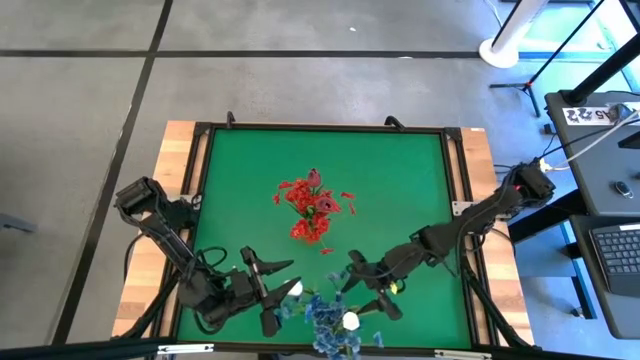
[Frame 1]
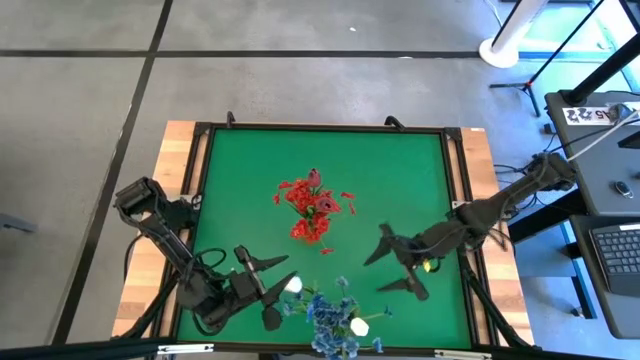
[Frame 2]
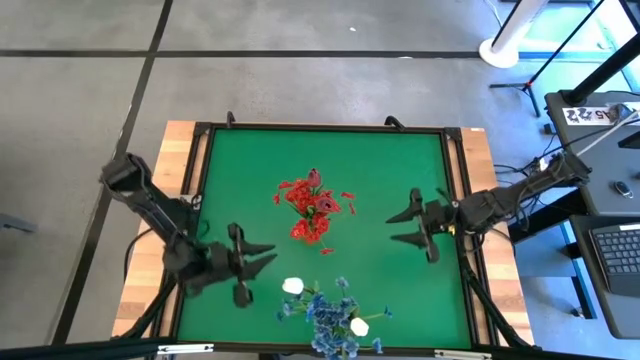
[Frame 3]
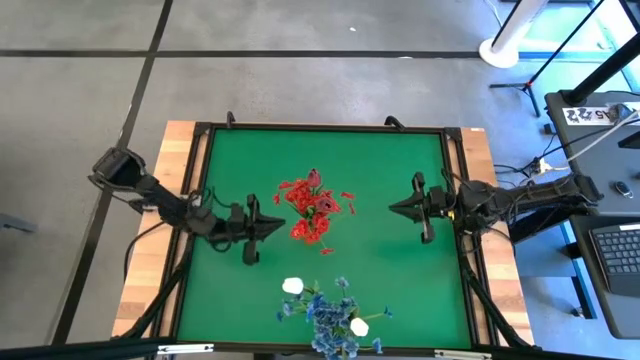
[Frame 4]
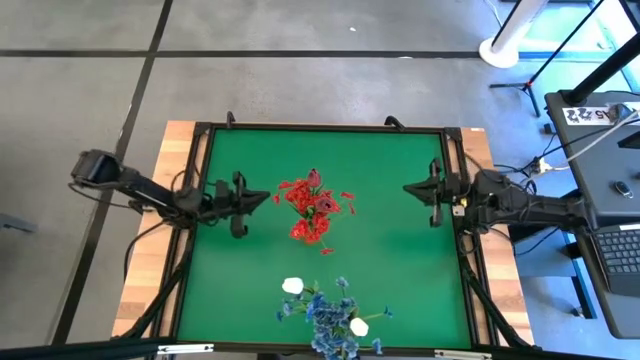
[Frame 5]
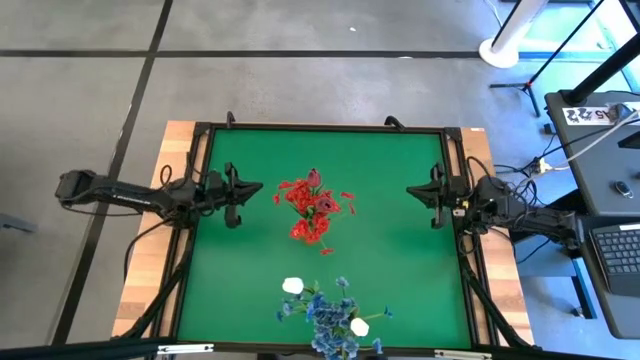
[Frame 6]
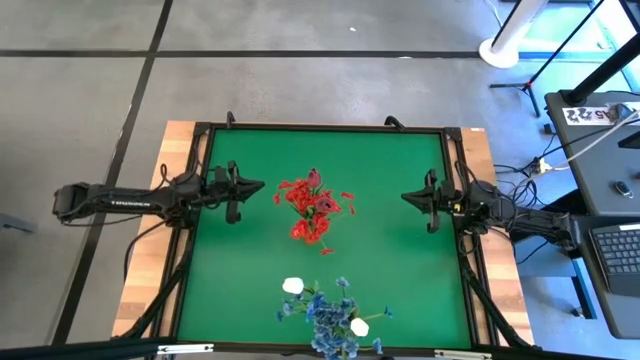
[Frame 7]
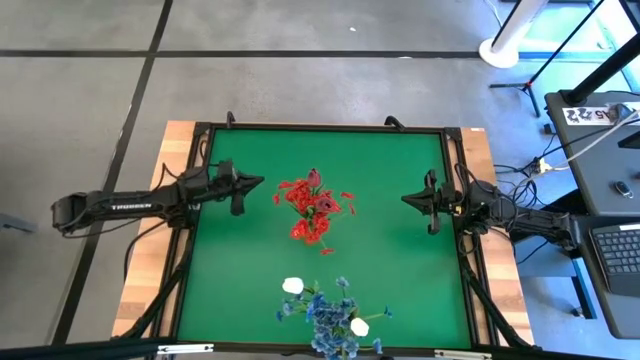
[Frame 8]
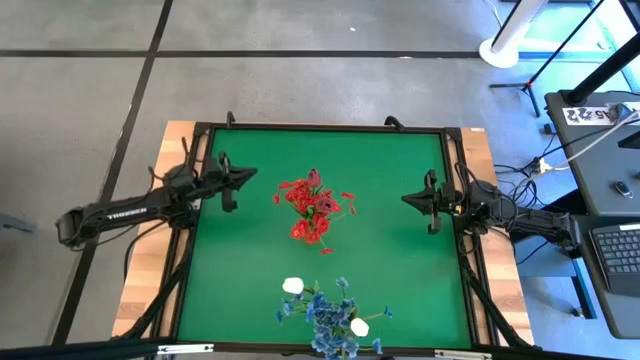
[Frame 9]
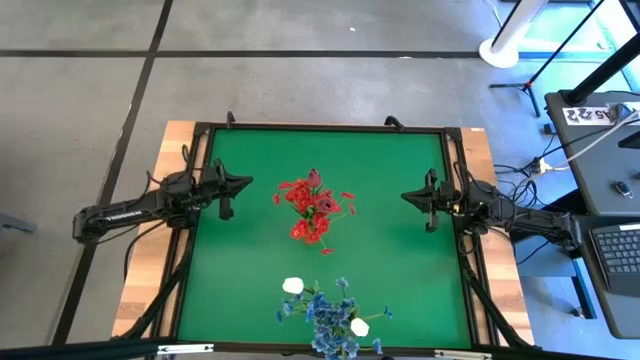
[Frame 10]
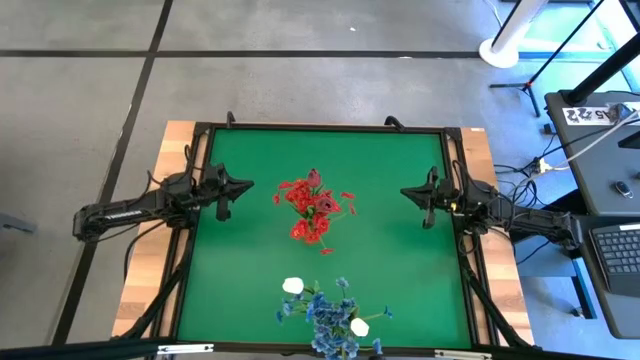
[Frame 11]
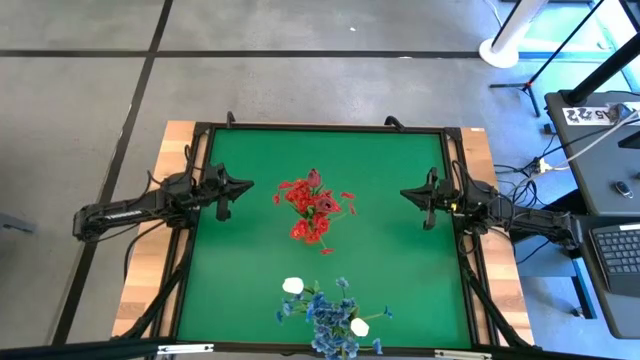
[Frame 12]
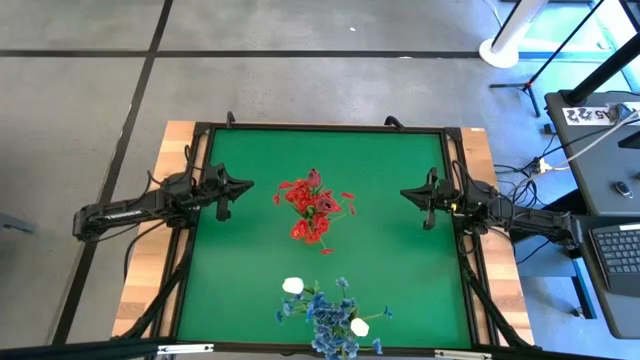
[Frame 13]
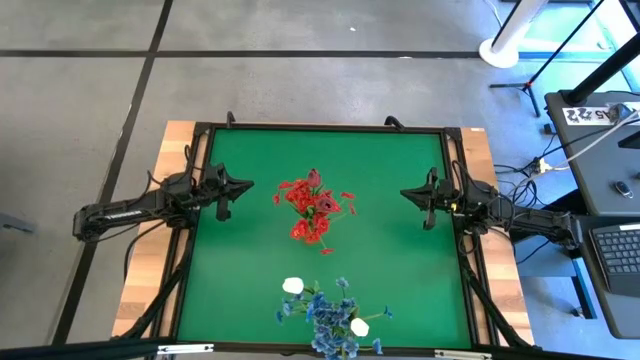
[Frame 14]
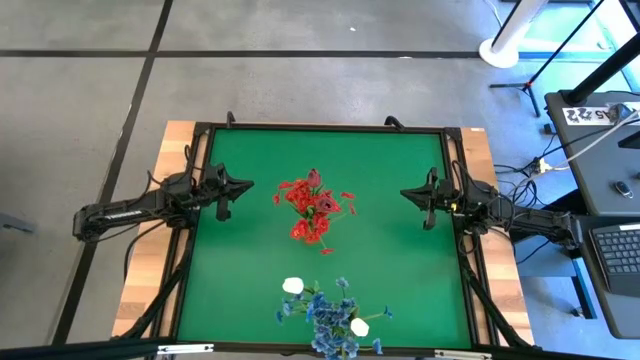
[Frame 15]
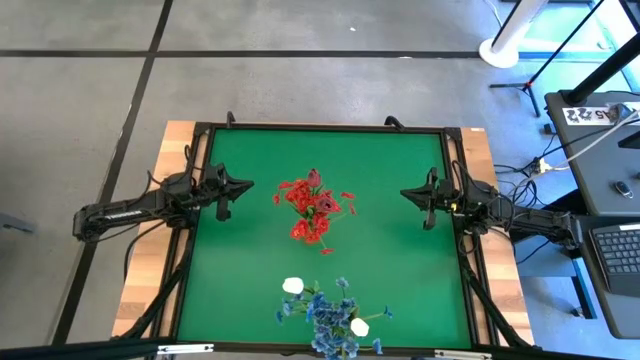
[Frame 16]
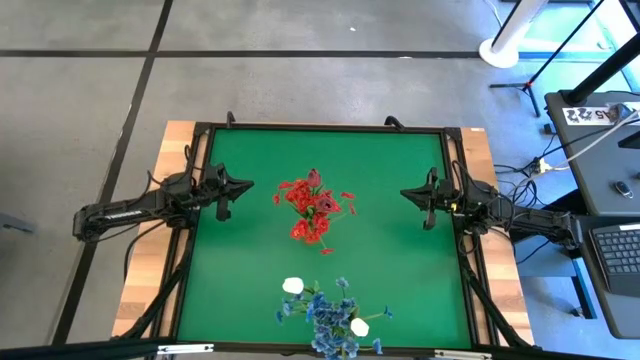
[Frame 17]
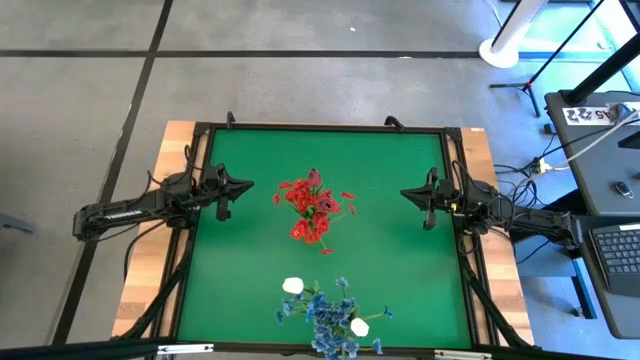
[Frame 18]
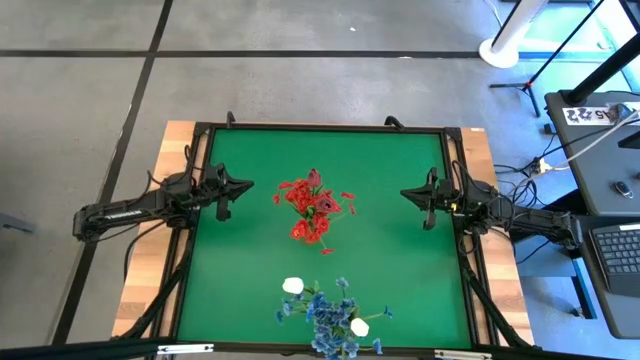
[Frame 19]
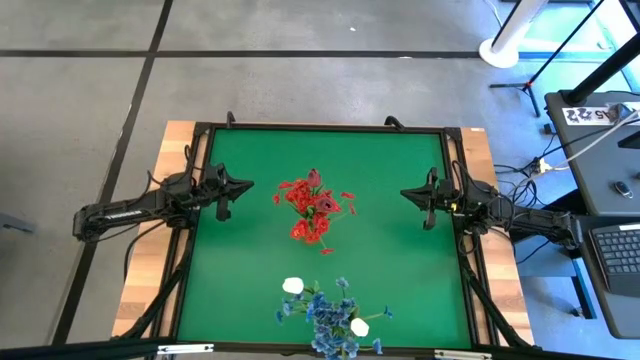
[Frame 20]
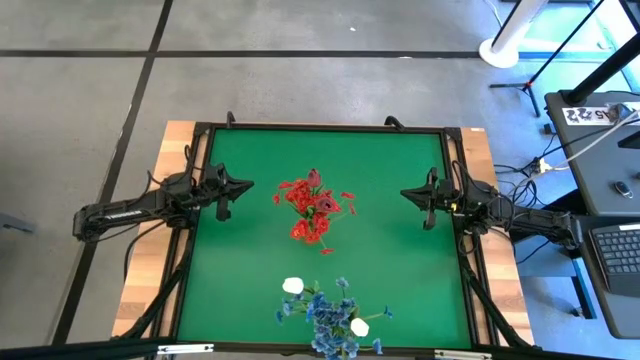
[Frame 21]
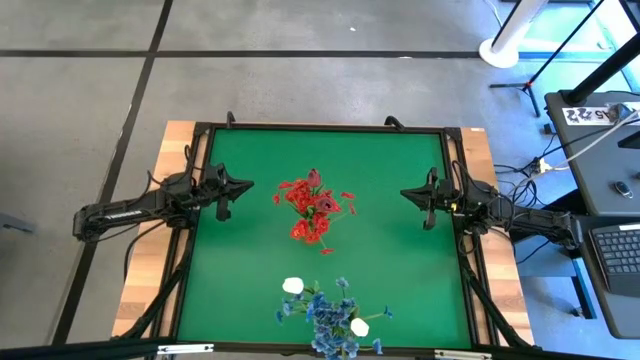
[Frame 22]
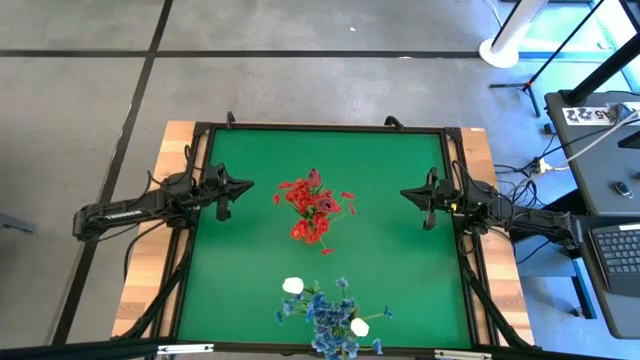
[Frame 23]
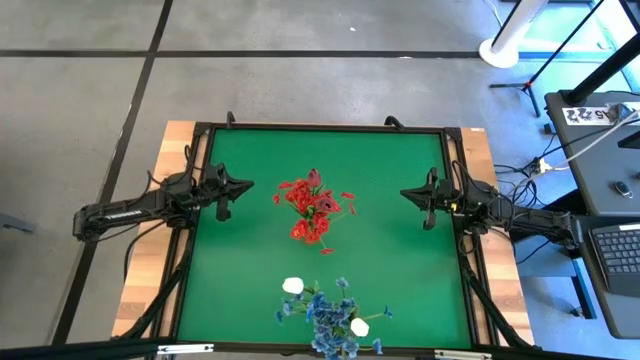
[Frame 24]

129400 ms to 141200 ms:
Task: Sort flowers into vase by color
Return to Home Position

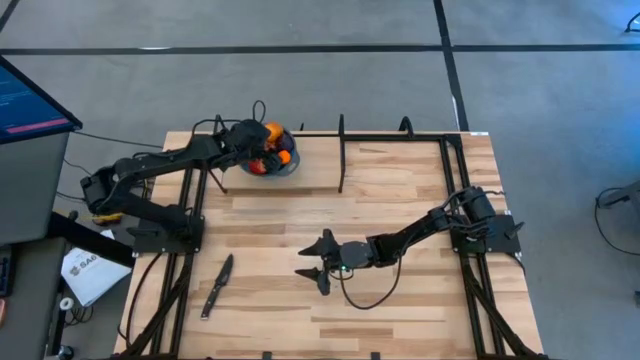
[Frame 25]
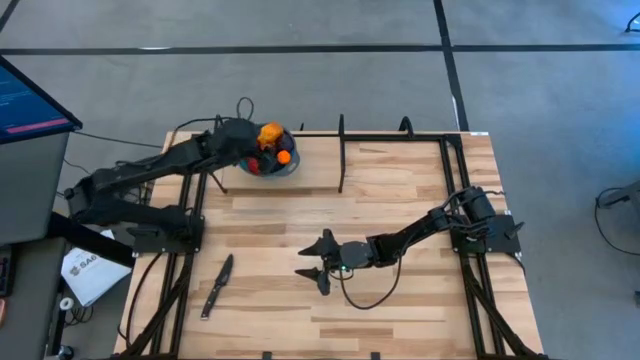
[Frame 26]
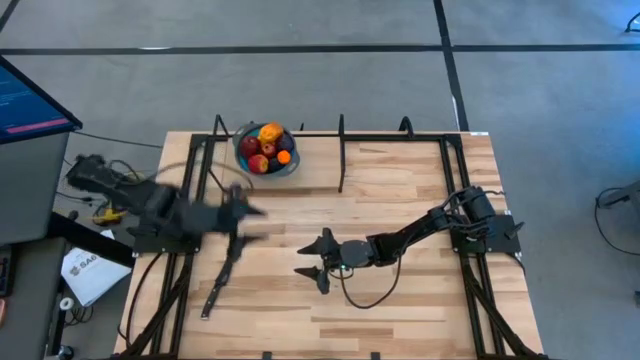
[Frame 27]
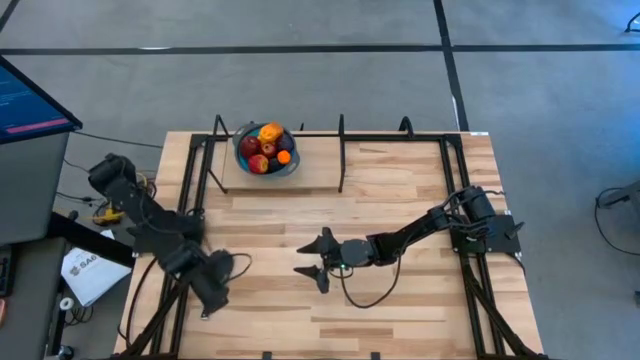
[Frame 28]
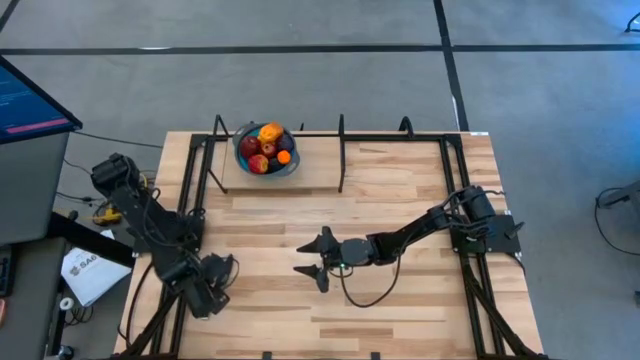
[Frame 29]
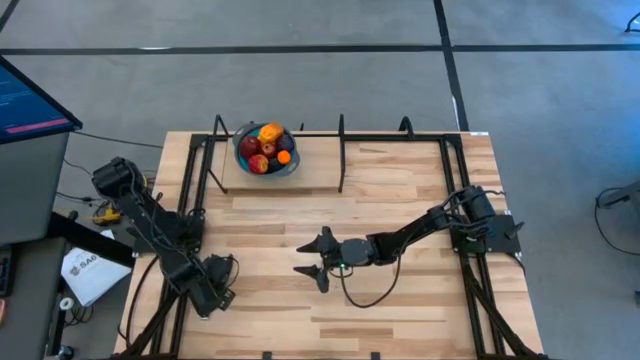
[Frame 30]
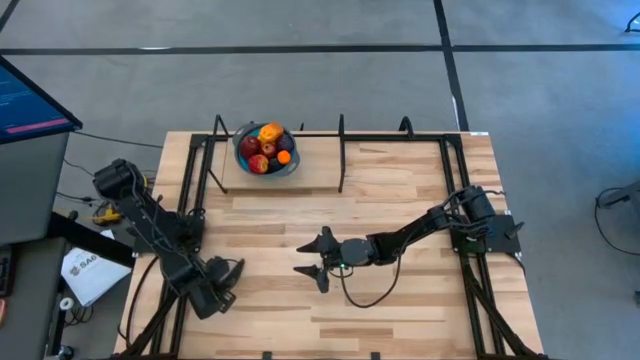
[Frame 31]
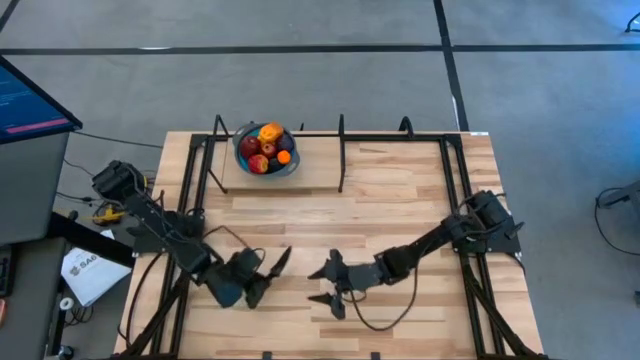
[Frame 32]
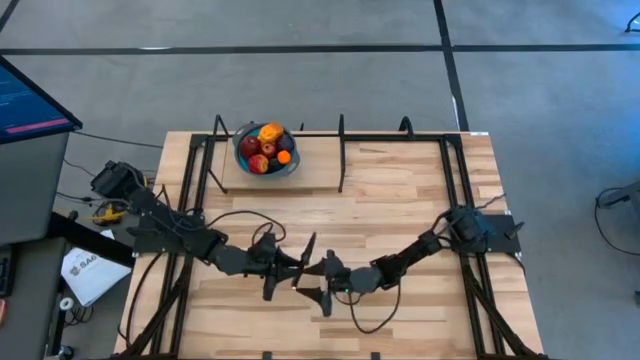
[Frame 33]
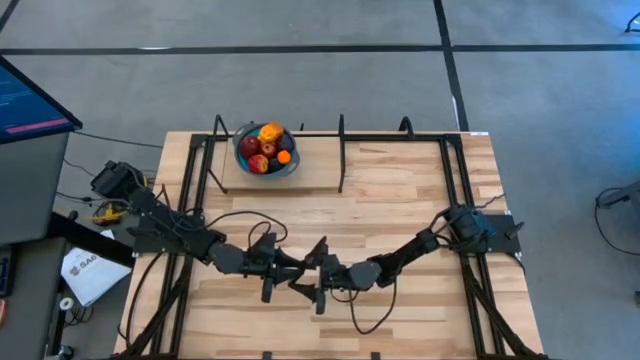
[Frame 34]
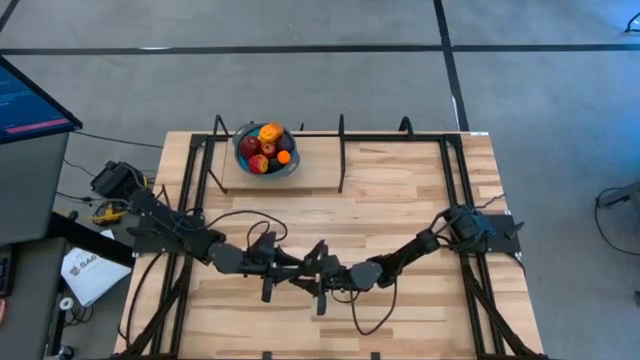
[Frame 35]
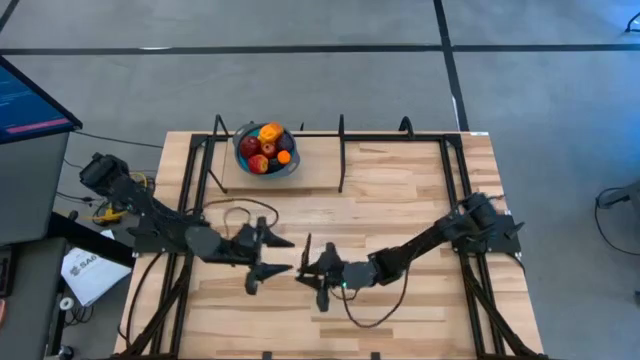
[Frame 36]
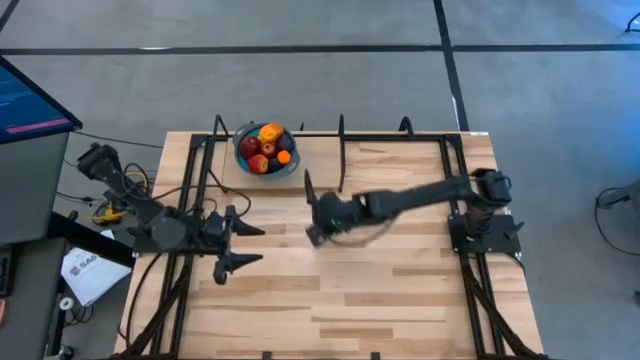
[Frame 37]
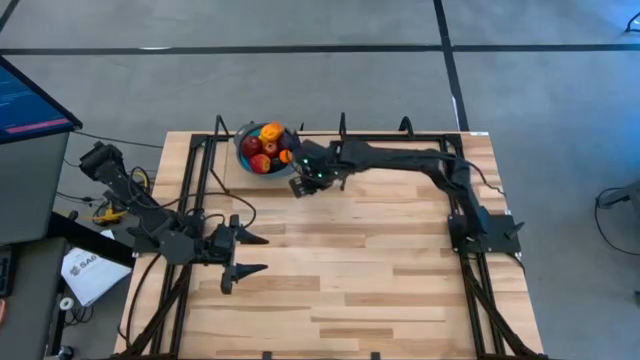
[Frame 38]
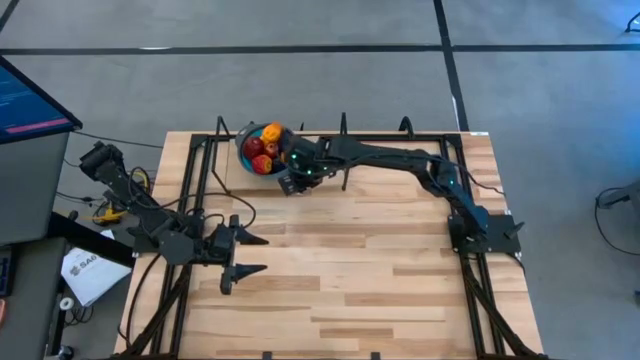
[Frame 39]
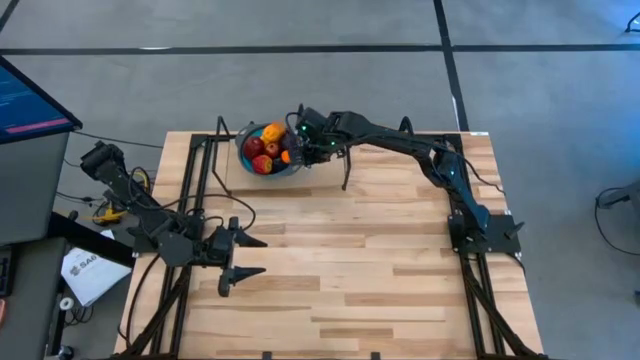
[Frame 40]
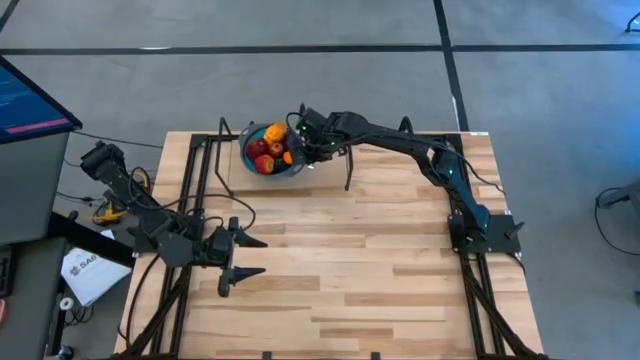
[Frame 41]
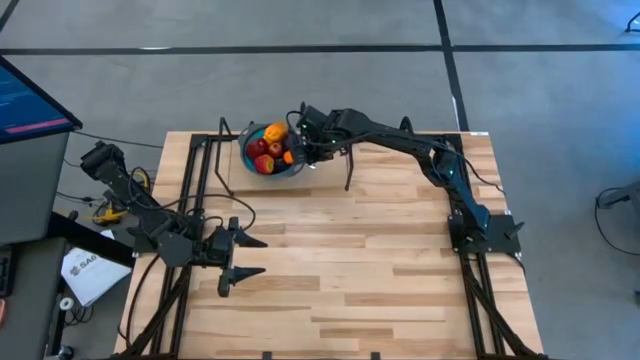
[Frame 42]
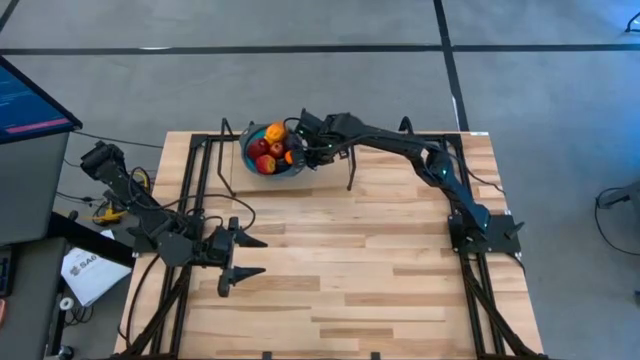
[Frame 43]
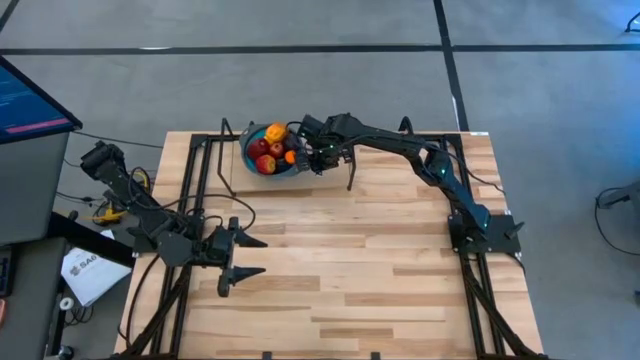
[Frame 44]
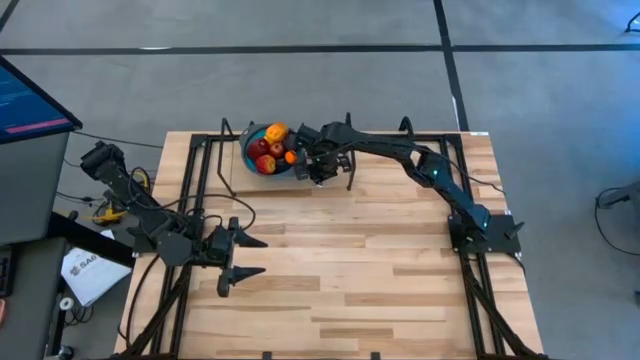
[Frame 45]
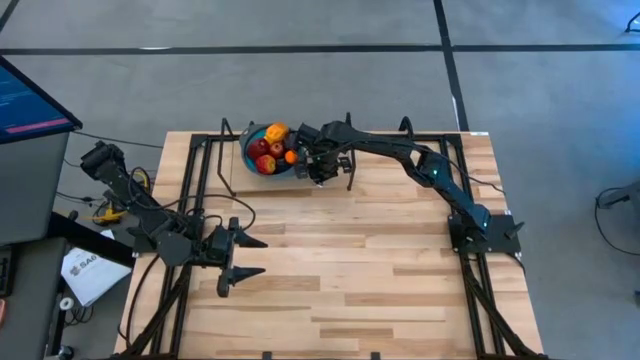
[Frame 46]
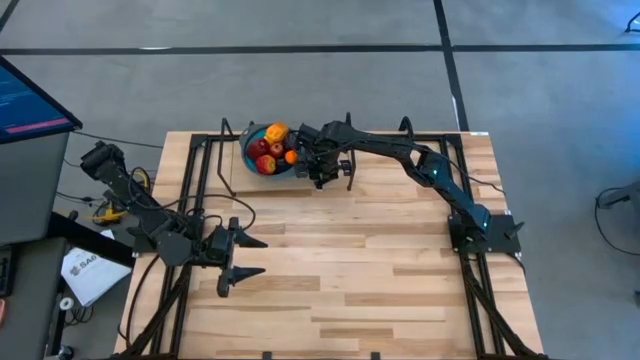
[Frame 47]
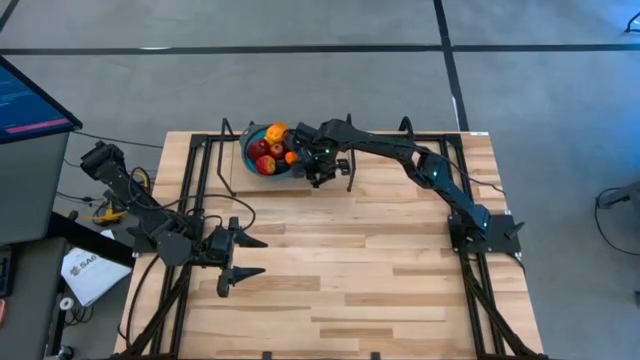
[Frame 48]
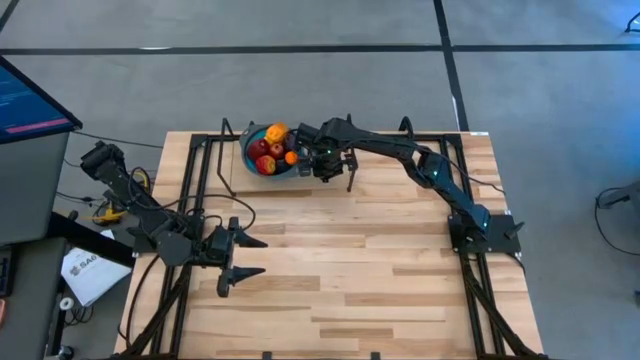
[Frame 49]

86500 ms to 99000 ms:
Task: Pick & Place Fruit
Put the black knife beside the blue strainer bowl on the shelf
